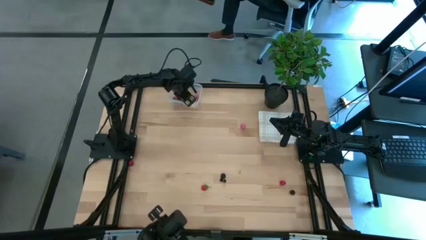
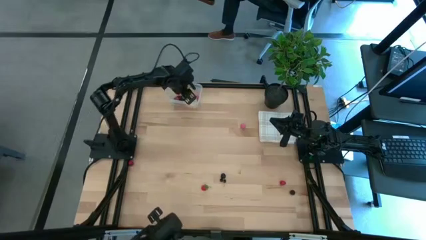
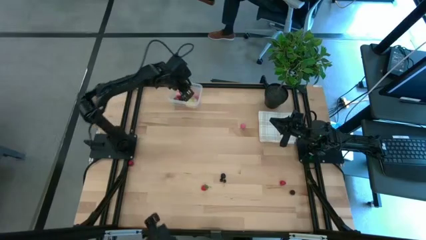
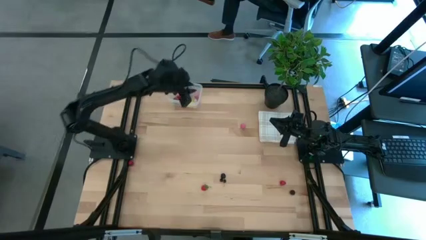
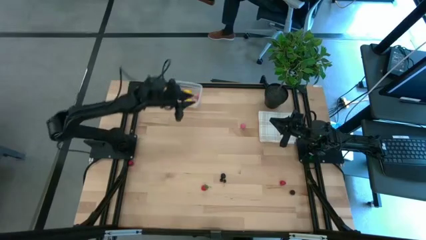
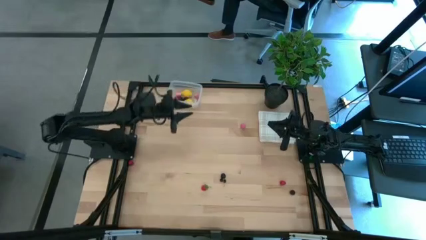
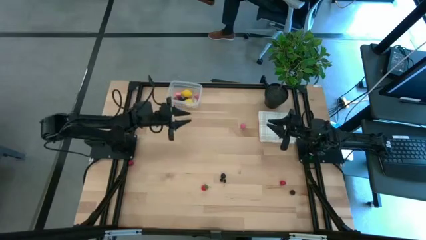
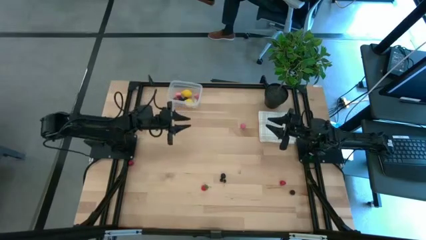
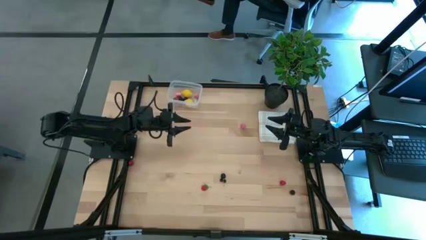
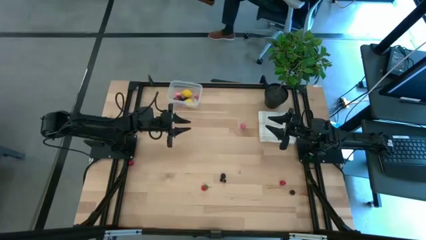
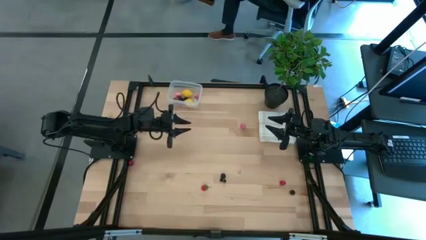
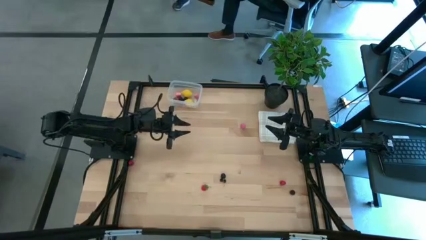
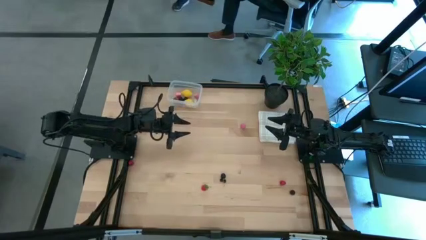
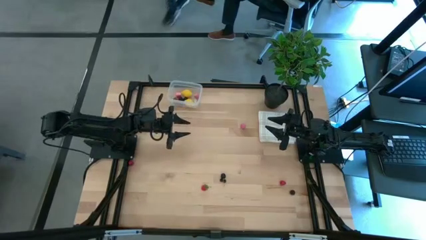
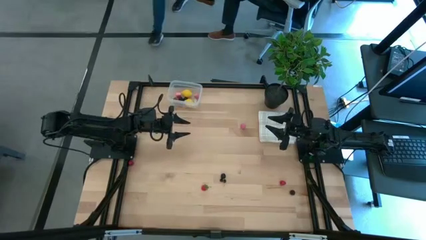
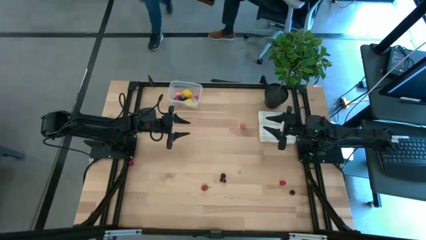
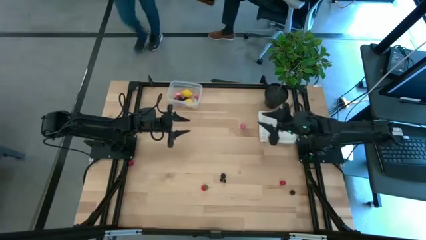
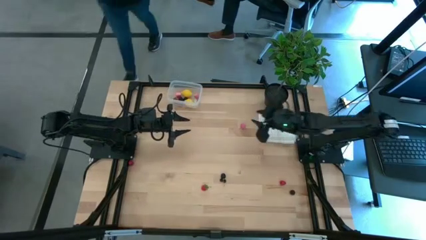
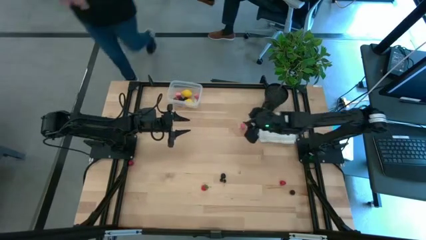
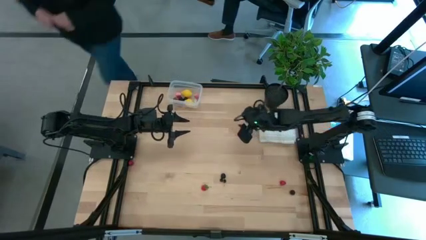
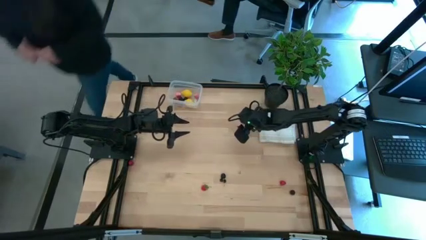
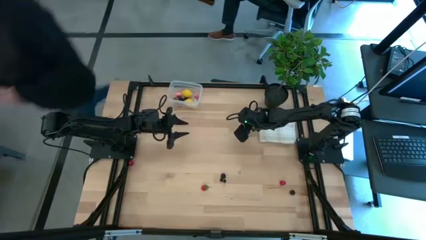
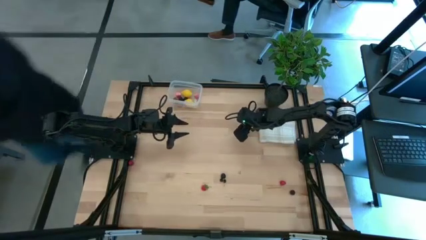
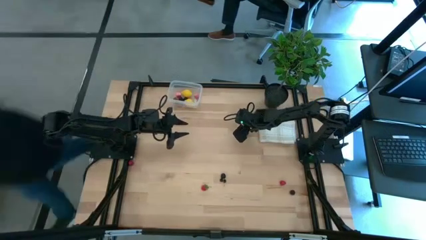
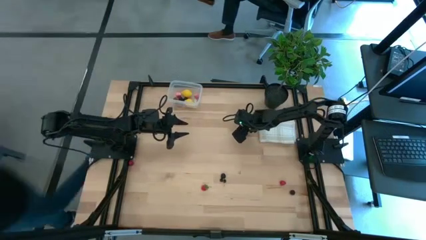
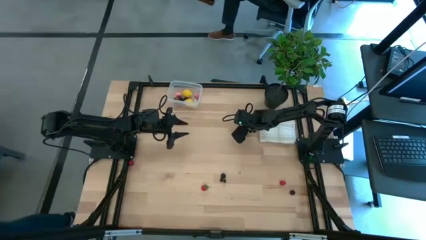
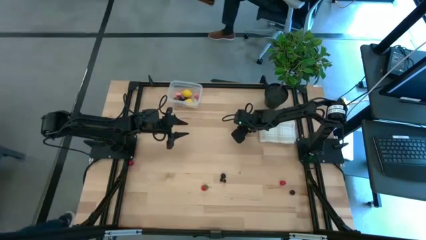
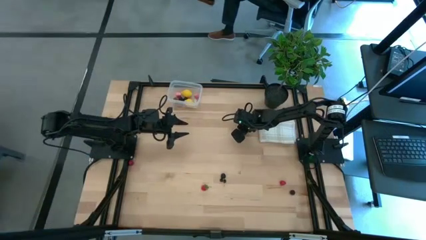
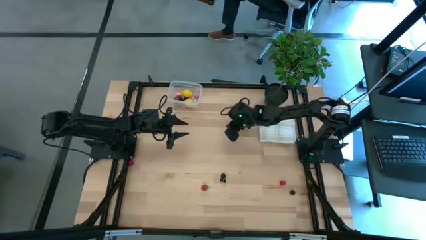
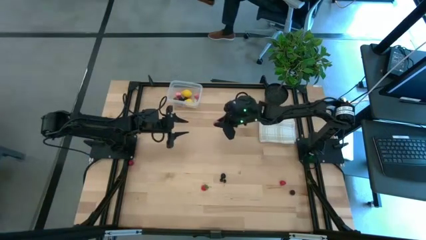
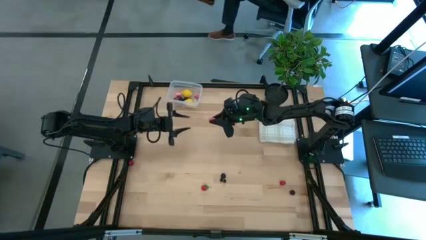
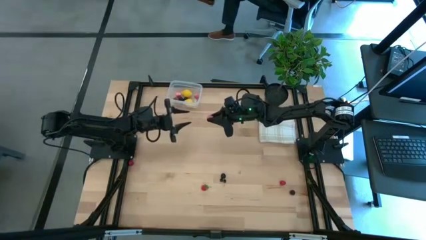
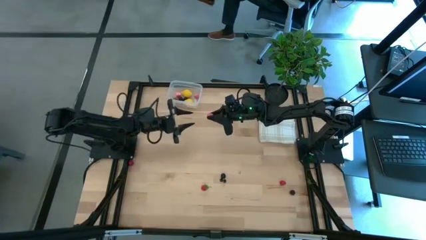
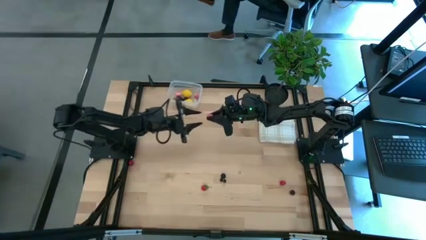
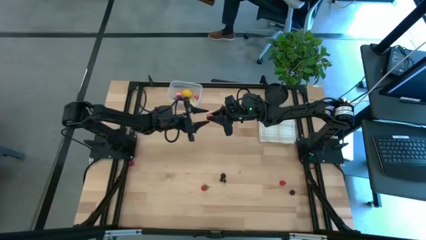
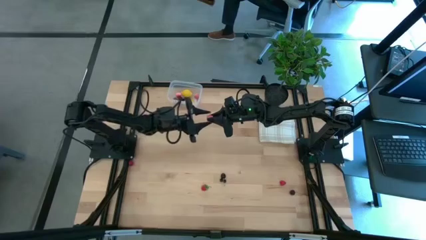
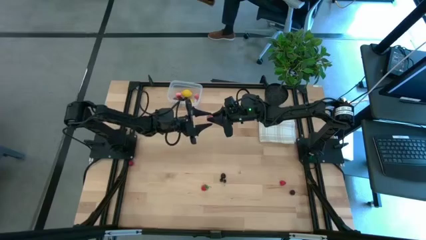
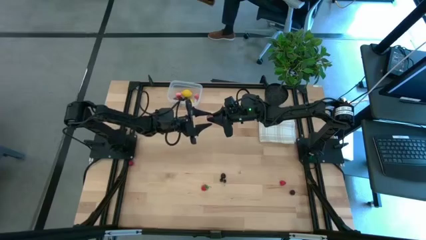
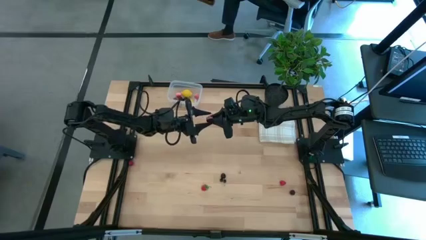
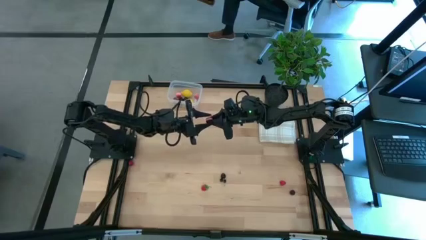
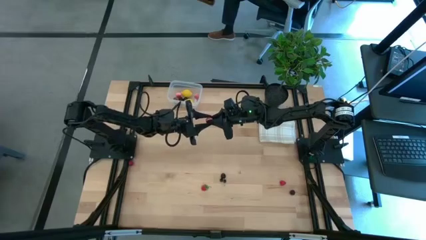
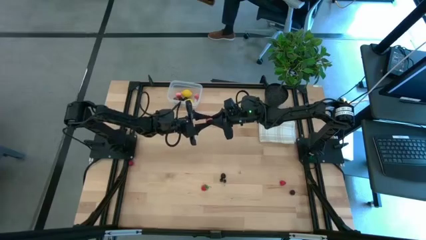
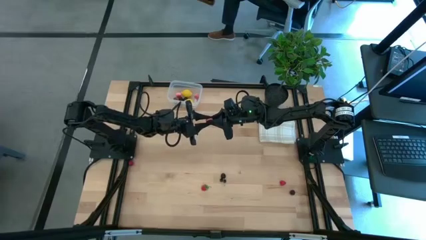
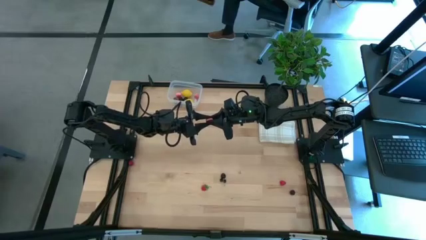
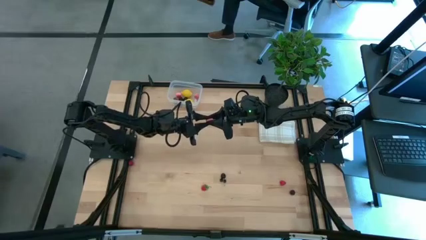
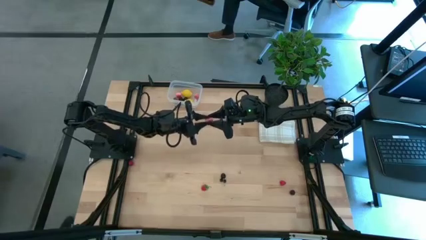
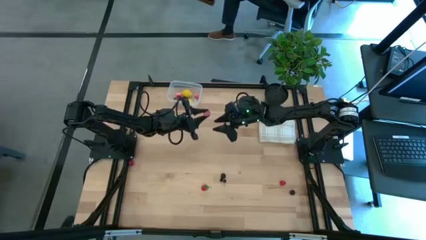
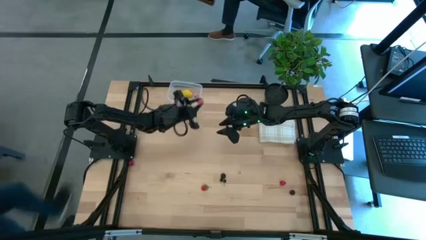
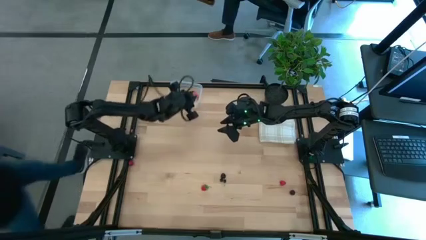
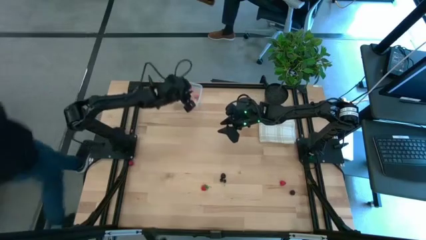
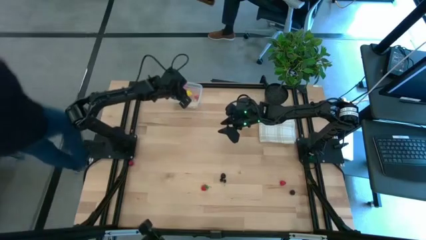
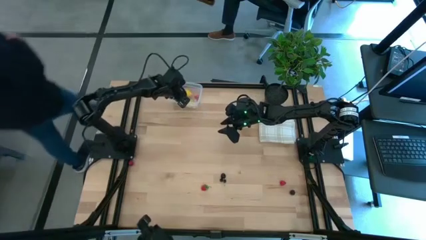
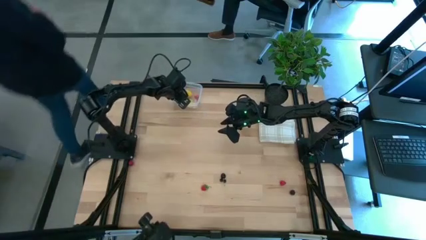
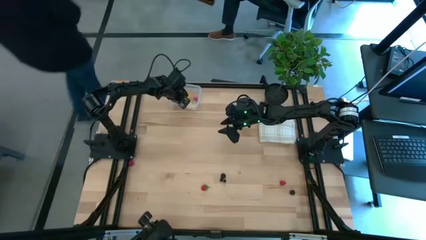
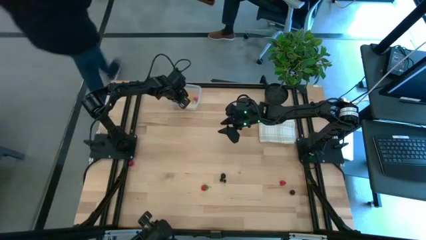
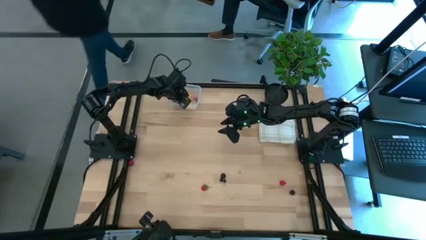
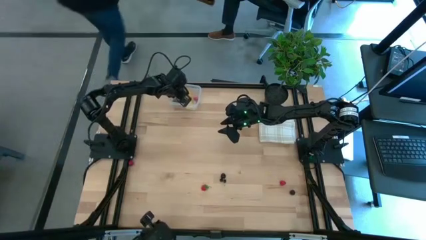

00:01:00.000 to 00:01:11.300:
Task: Pick and placing Produce into tupperware
Put the pink peach into the transparent bin
